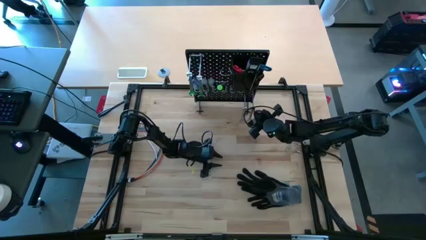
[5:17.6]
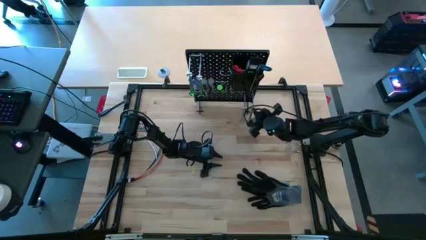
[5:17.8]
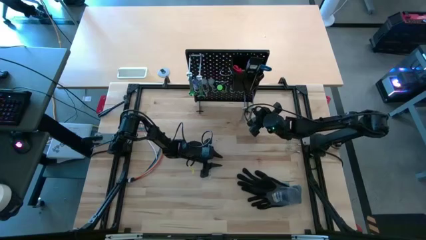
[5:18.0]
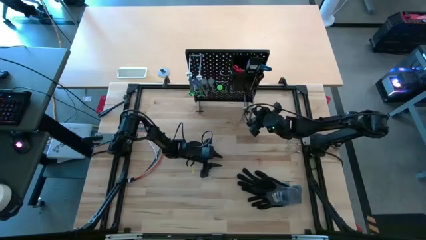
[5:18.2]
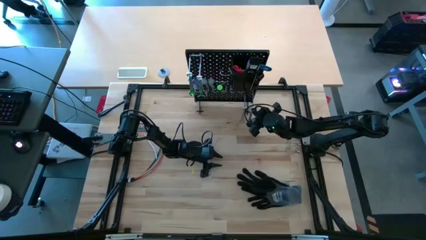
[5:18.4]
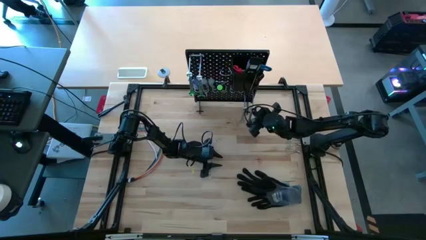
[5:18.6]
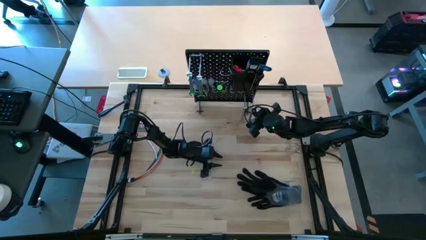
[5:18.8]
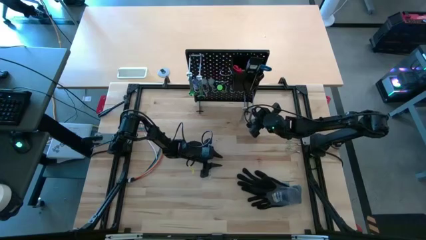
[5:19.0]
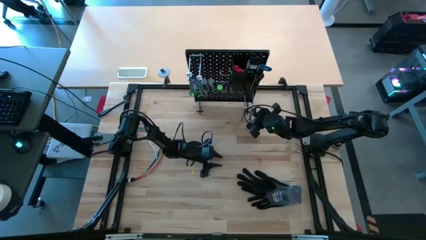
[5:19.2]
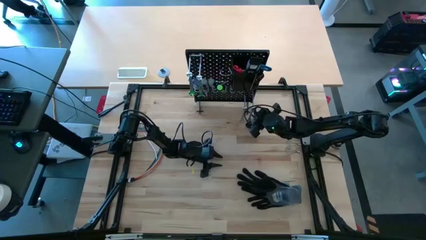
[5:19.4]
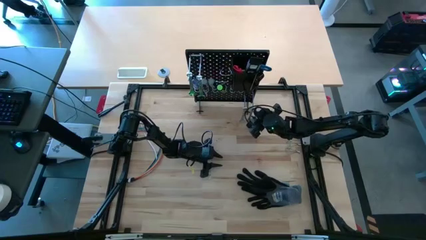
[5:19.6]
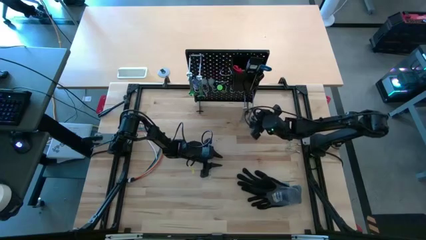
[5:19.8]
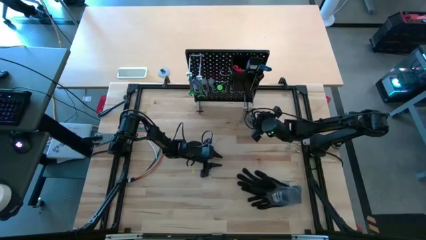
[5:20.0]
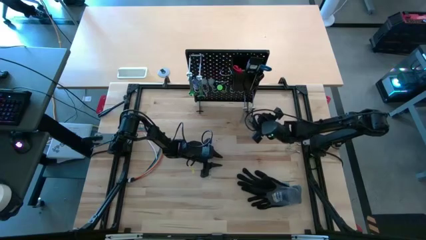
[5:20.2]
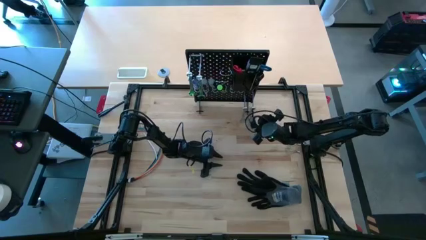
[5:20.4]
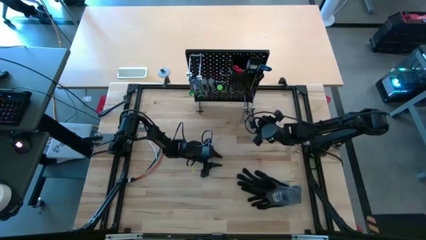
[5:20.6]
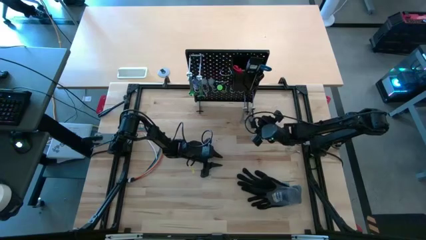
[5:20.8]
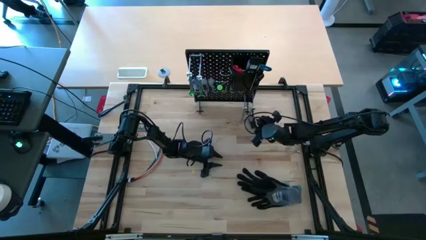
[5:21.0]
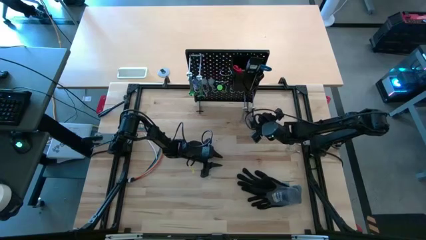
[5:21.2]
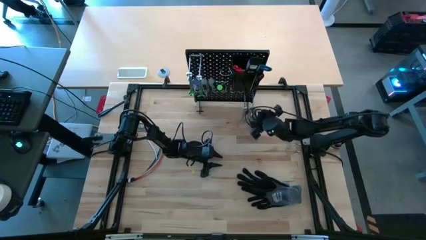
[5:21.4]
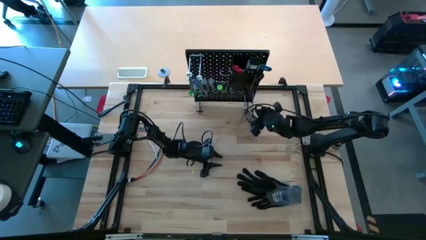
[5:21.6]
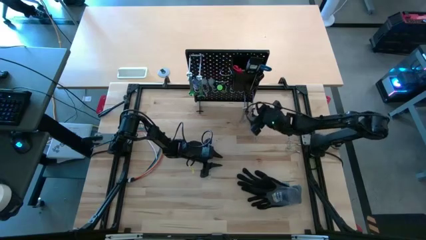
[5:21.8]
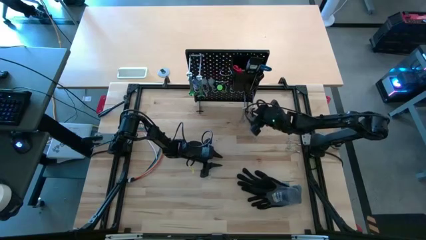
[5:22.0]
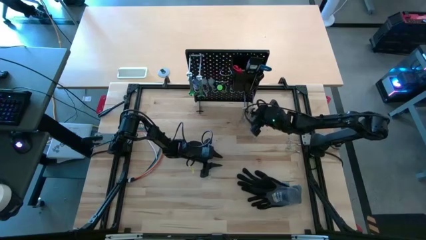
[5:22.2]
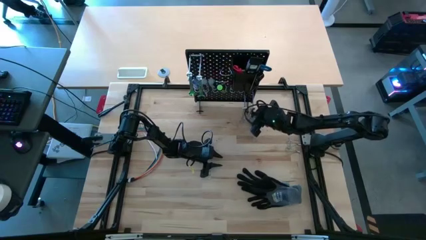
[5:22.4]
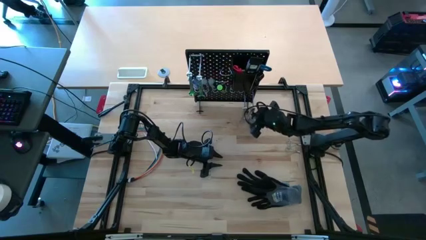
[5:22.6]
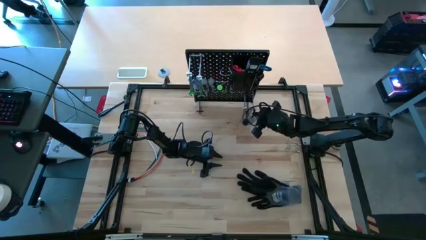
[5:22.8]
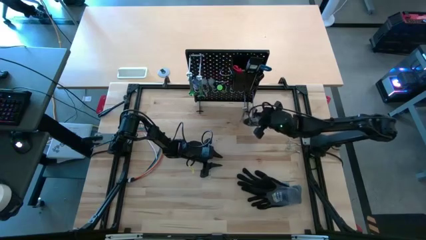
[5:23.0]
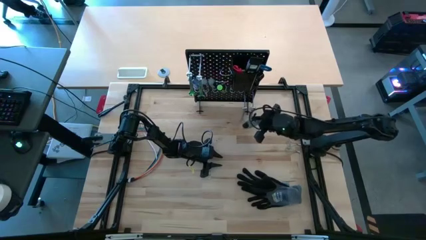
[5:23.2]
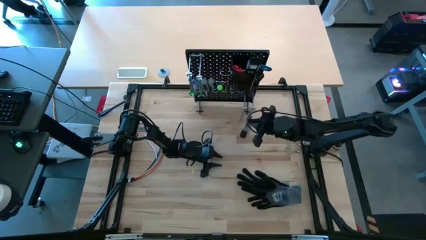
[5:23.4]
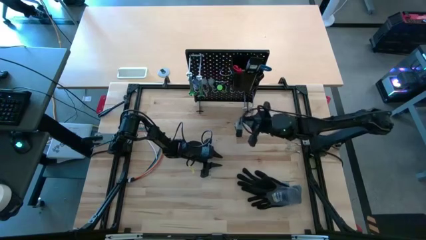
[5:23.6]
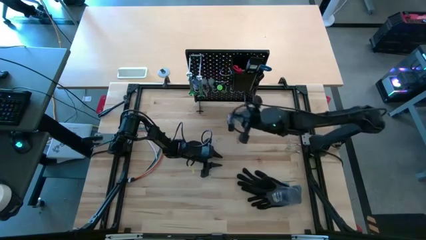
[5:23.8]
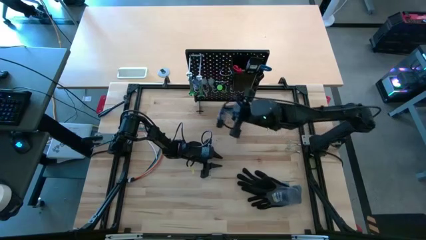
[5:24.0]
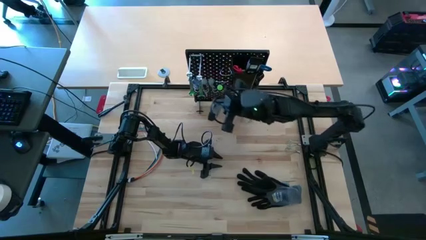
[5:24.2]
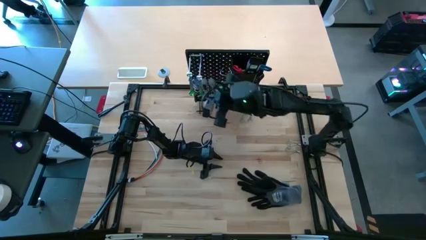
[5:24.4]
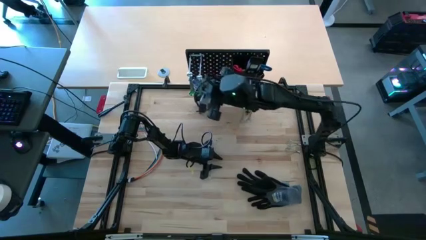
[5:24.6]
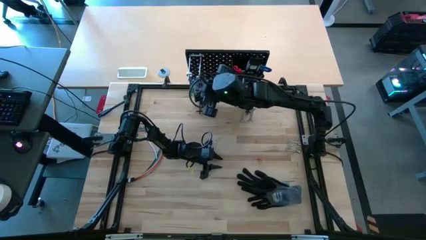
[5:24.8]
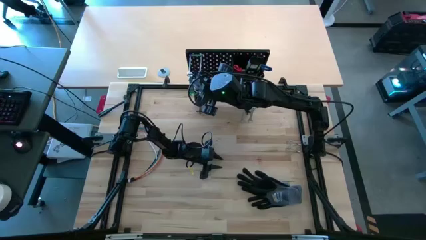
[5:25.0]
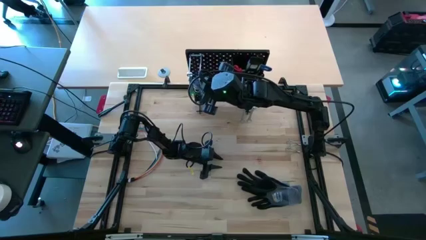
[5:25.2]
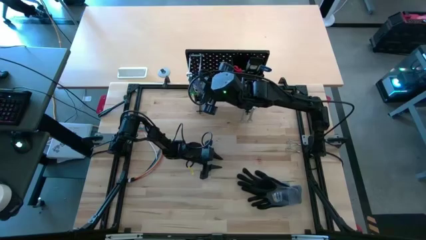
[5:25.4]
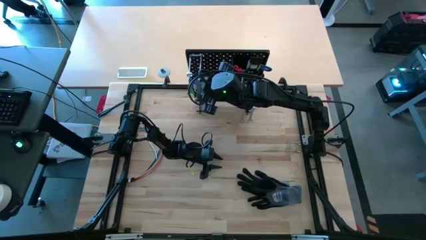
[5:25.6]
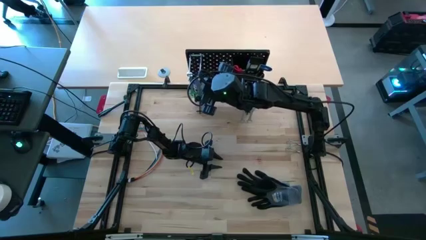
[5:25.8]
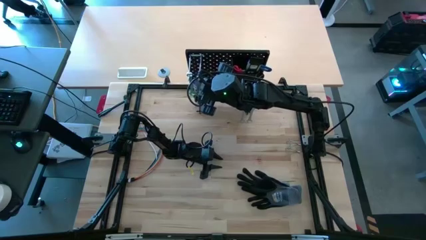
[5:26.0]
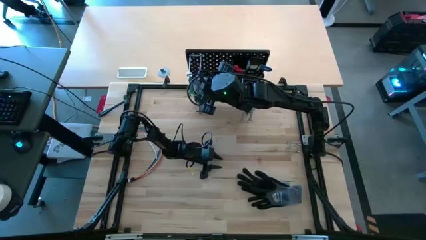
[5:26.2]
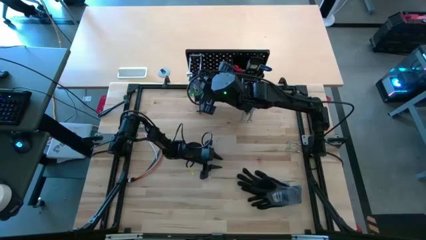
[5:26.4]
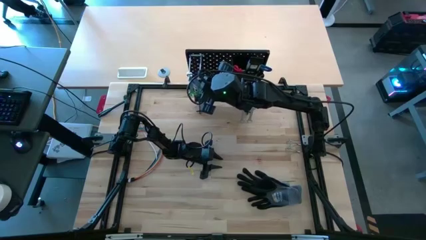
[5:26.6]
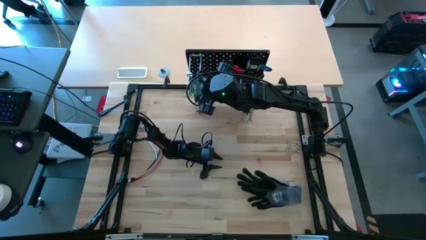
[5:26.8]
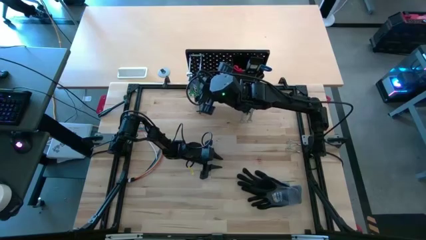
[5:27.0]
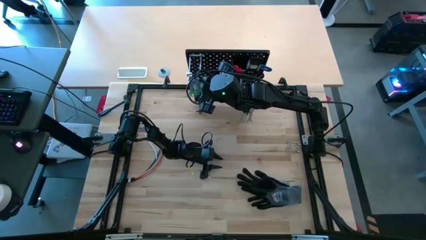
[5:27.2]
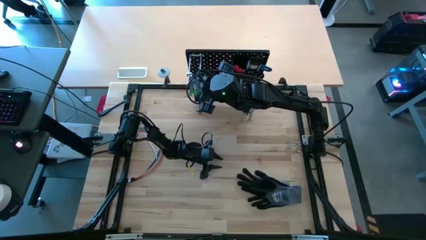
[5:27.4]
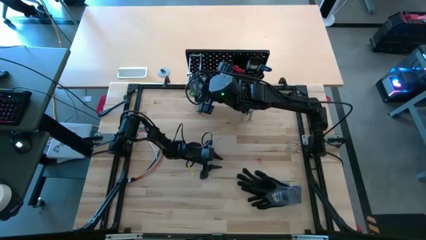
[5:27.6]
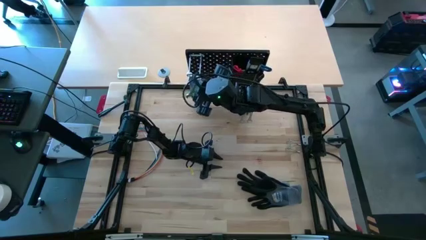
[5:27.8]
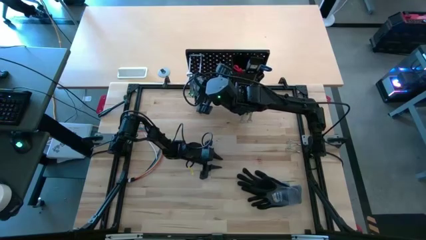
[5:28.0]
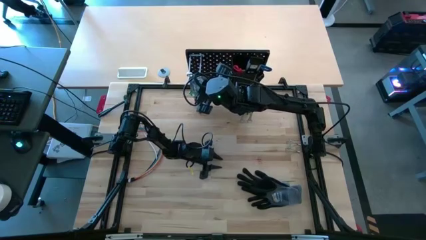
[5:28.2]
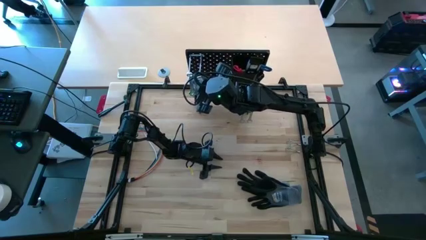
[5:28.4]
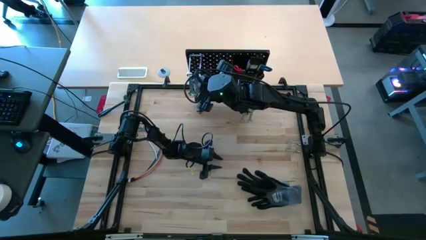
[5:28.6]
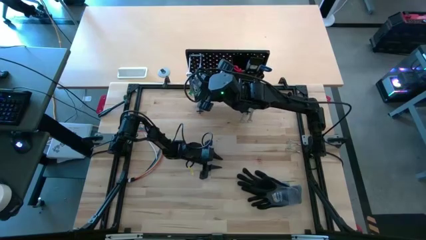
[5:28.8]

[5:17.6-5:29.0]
Task: Hang tools onto peg board
Hang the gray tape measure on the peg board
